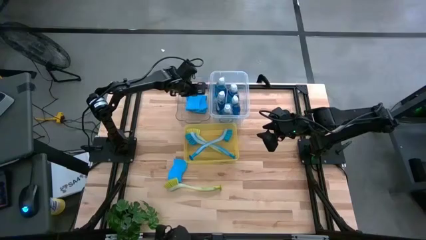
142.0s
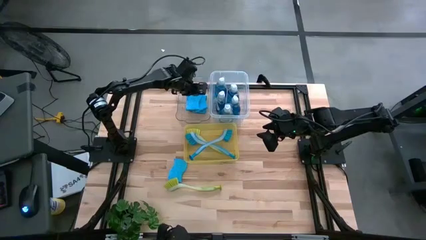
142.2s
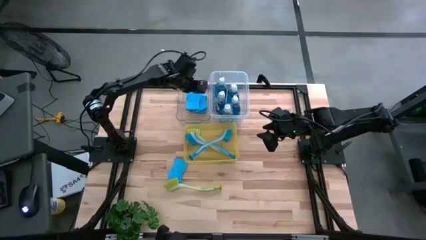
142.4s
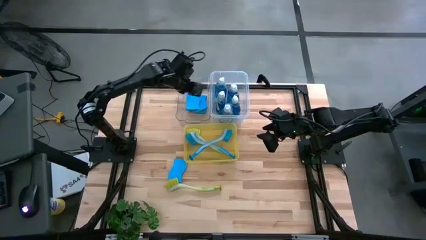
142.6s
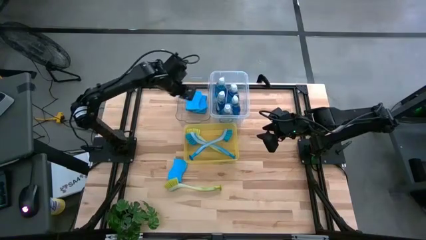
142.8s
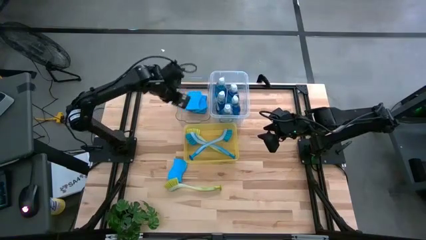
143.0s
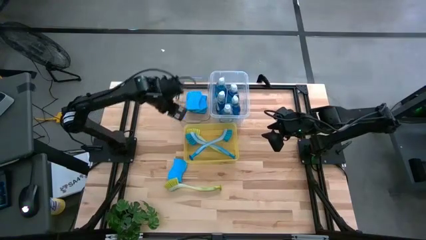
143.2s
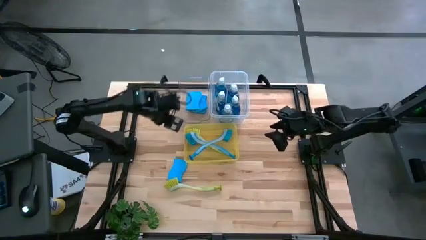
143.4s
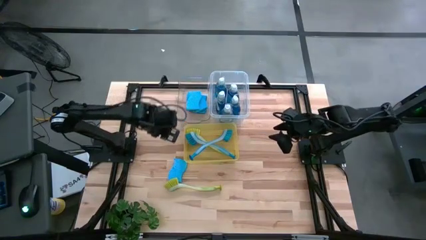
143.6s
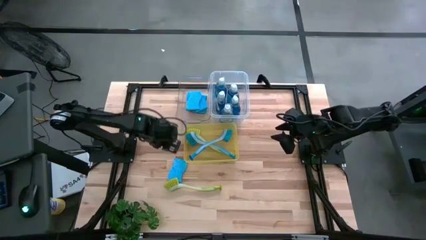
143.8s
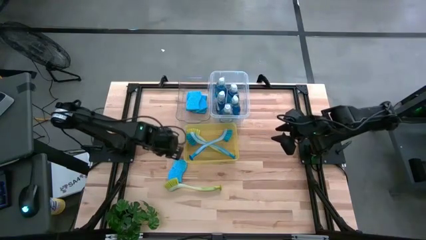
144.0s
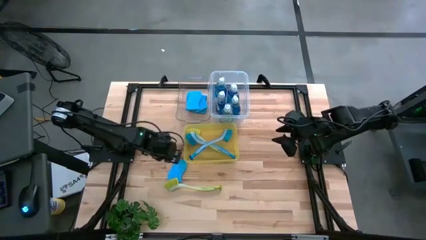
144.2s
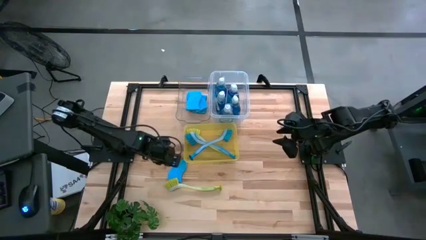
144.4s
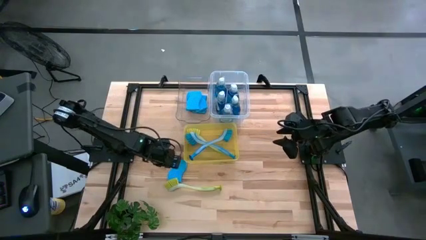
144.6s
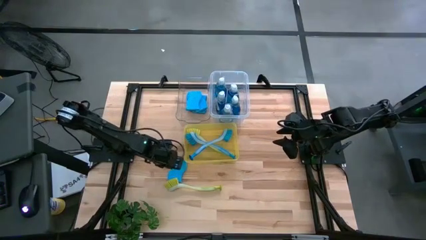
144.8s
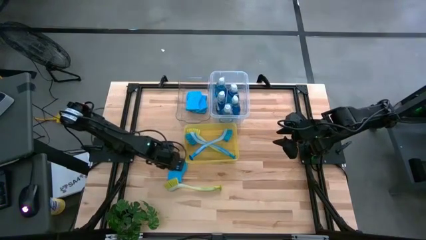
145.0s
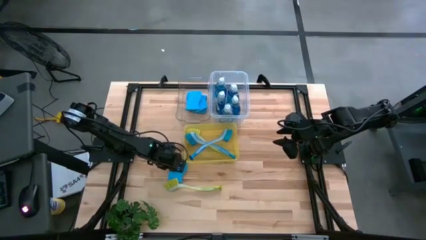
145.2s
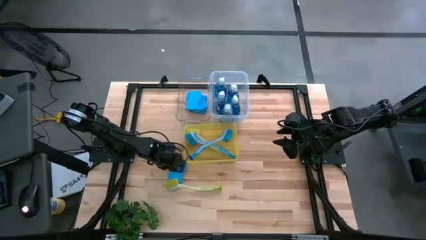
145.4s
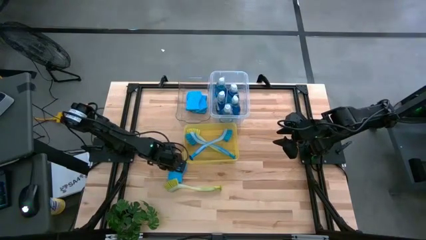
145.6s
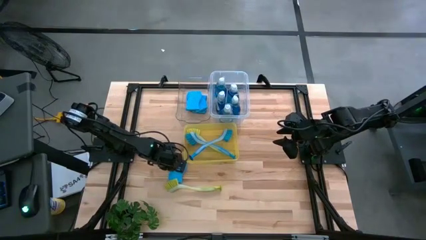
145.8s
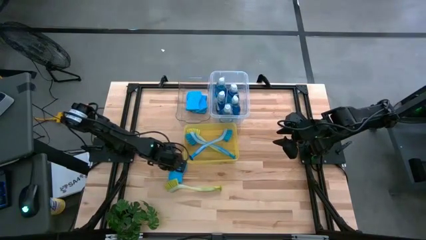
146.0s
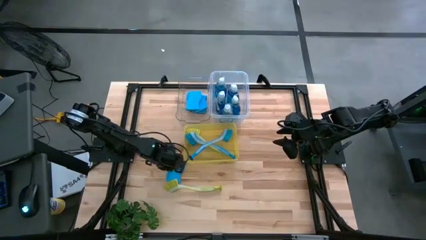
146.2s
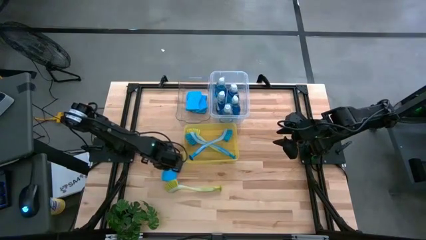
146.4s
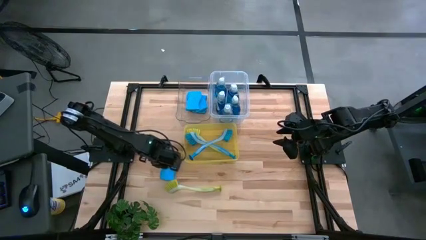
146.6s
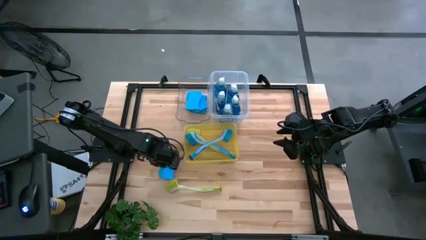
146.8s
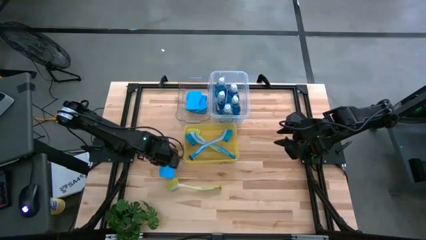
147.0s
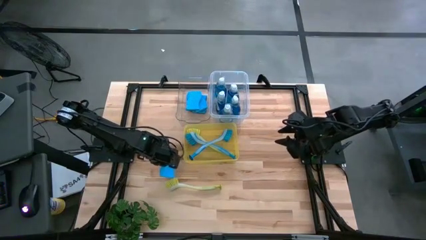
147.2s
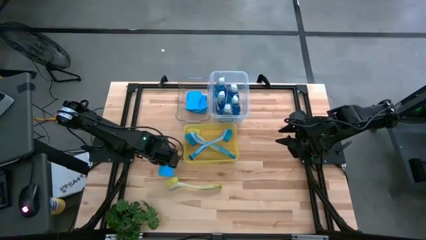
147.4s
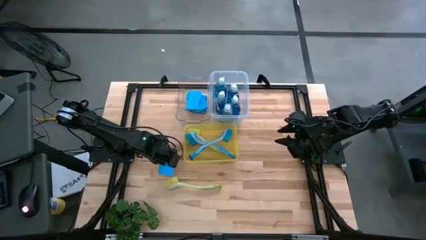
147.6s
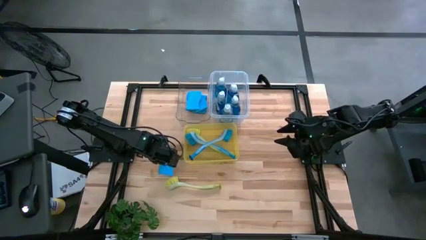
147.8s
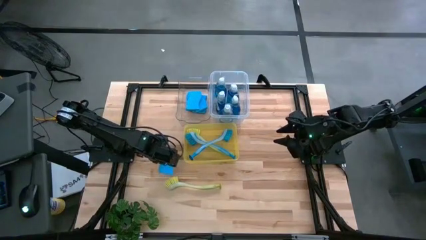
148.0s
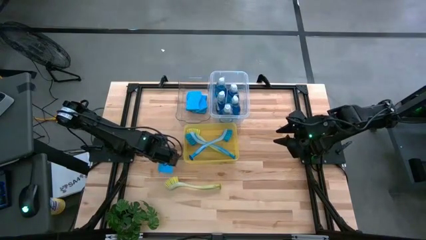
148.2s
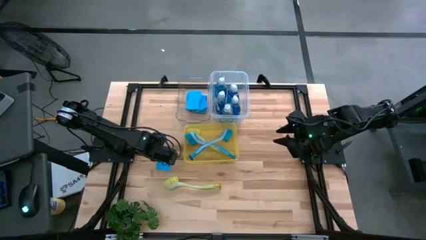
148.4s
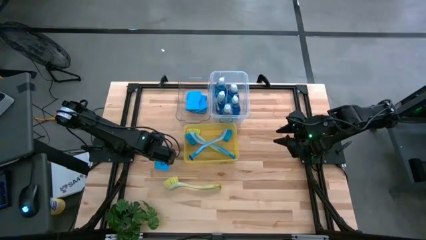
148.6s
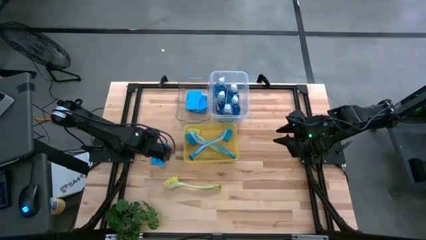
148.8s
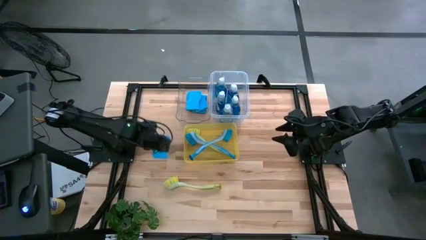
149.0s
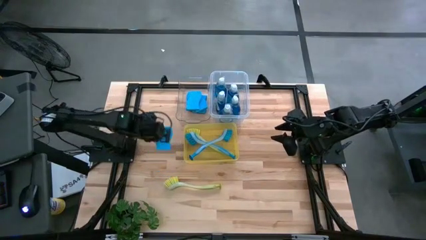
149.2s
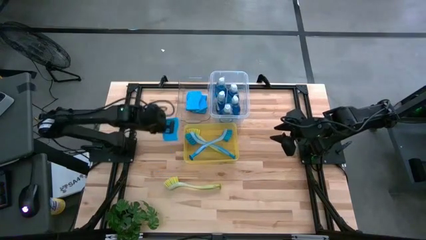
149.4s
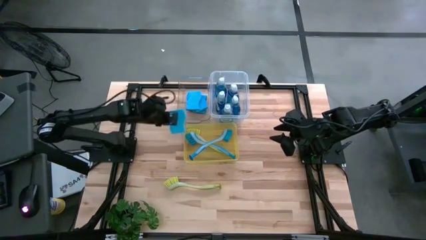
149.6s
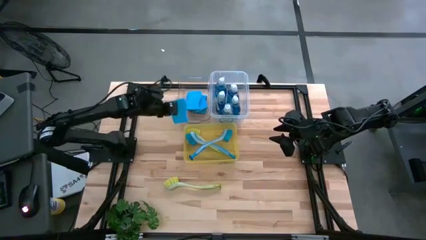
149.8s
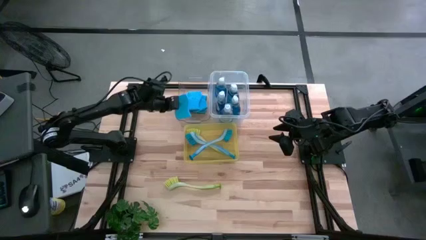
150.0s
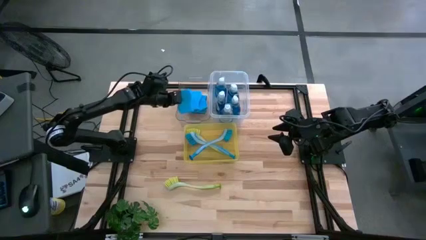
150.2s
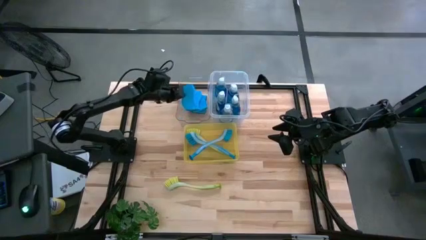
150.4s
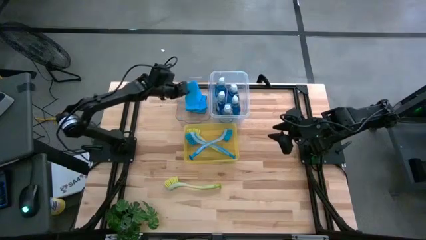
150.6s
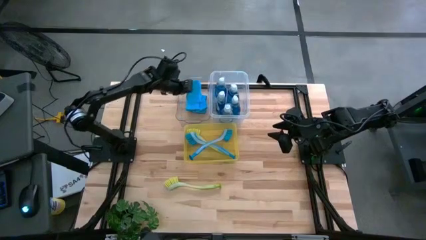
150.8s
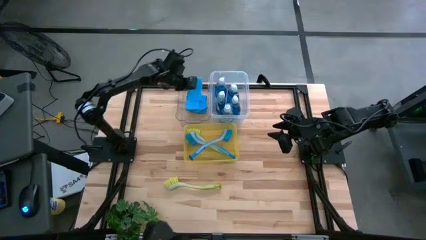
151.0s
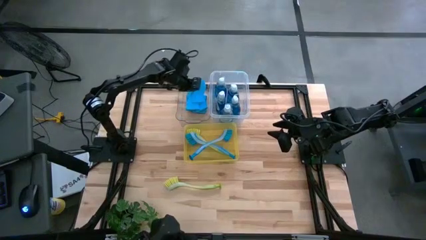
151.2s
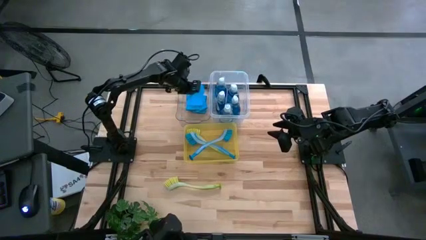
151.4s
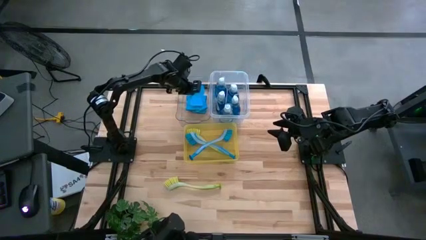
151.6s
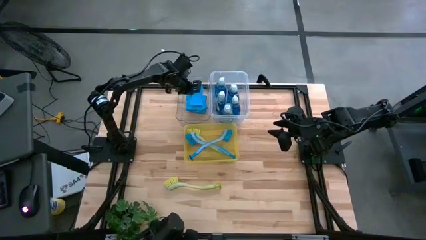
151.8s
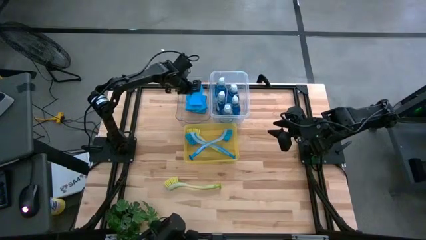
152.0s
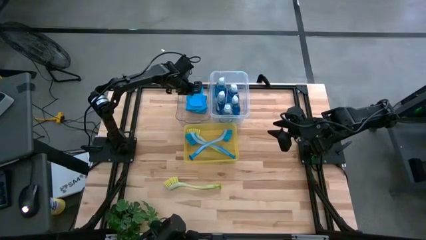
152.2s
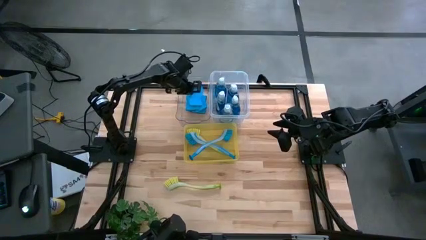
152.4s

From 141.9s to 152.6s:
Task: Pick & Place Kitchen Sink Supplies
Put the blue sponge into the transparent bin
